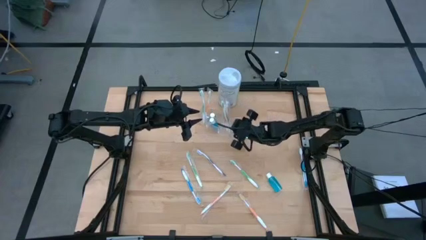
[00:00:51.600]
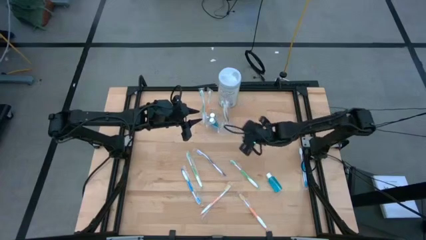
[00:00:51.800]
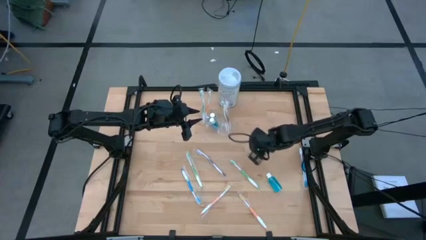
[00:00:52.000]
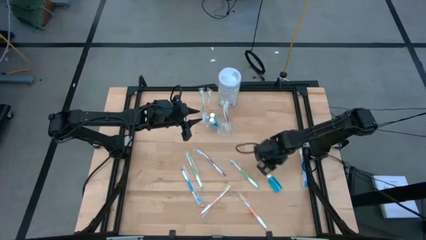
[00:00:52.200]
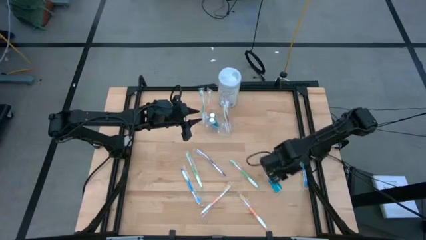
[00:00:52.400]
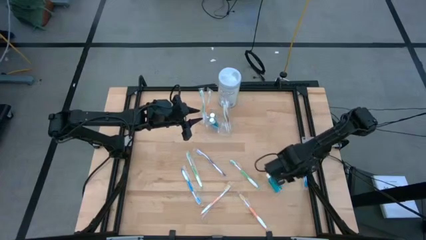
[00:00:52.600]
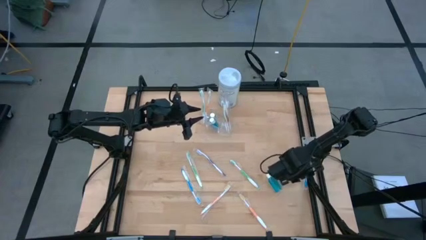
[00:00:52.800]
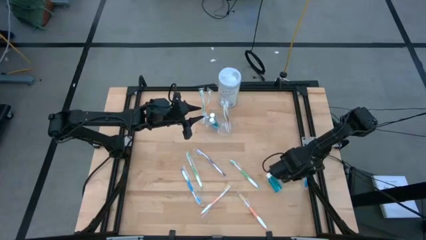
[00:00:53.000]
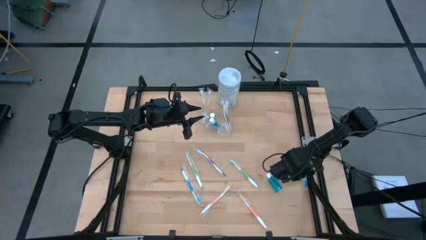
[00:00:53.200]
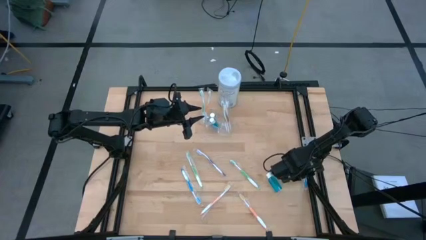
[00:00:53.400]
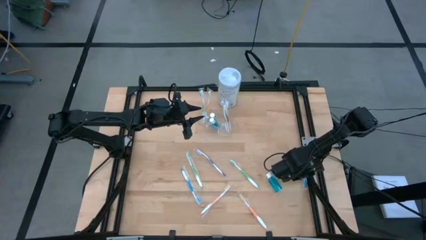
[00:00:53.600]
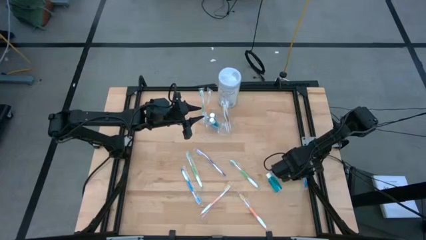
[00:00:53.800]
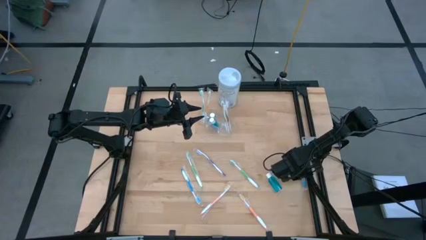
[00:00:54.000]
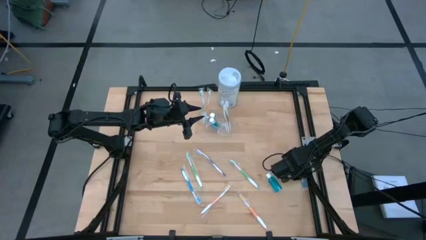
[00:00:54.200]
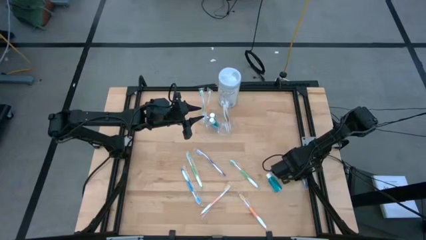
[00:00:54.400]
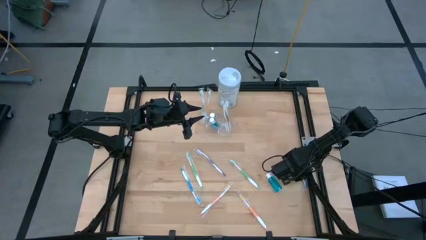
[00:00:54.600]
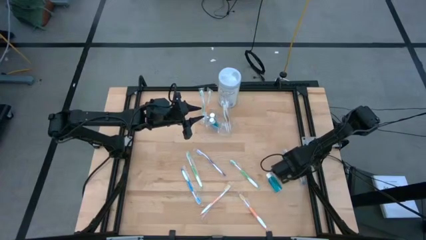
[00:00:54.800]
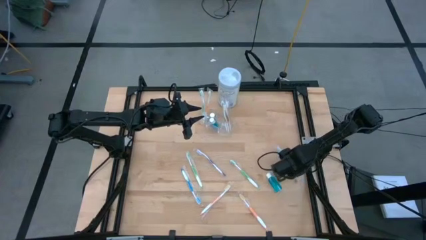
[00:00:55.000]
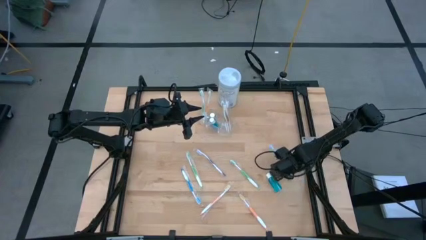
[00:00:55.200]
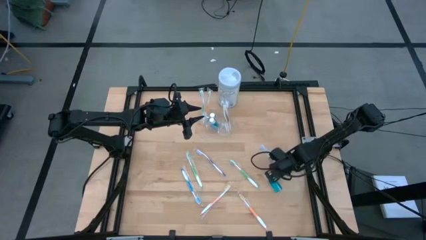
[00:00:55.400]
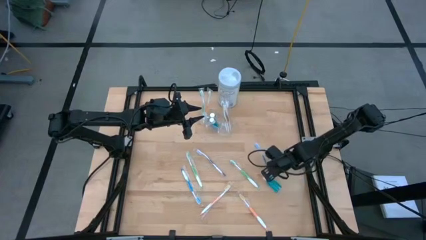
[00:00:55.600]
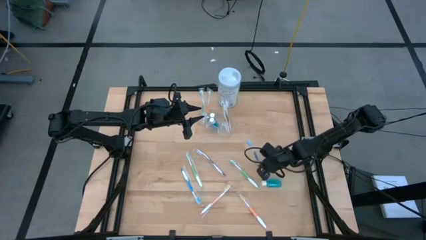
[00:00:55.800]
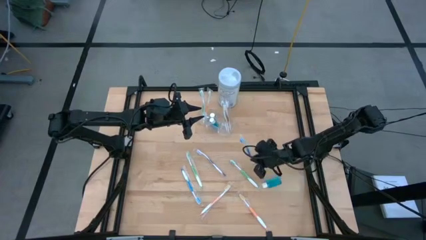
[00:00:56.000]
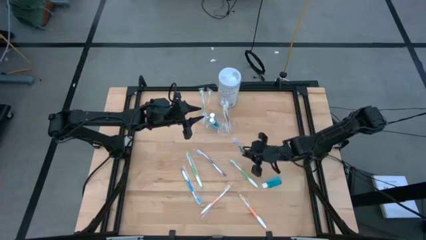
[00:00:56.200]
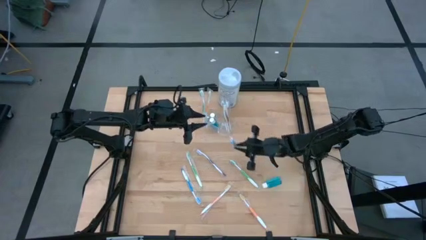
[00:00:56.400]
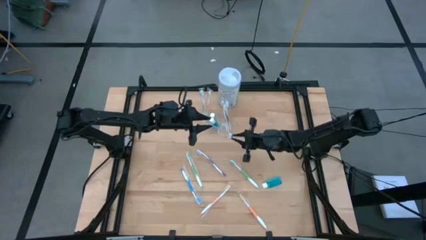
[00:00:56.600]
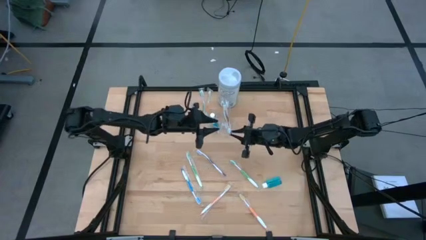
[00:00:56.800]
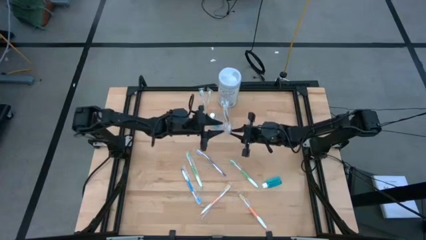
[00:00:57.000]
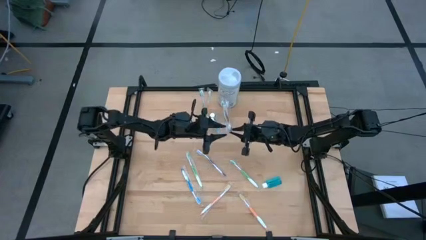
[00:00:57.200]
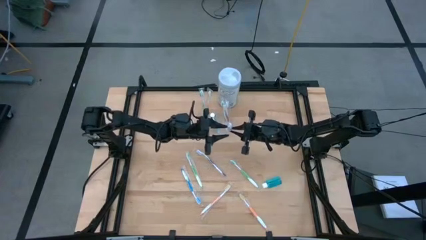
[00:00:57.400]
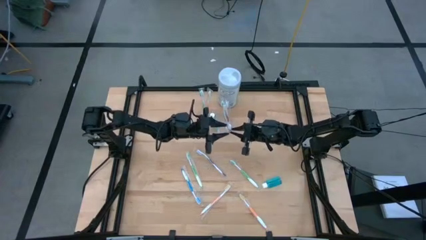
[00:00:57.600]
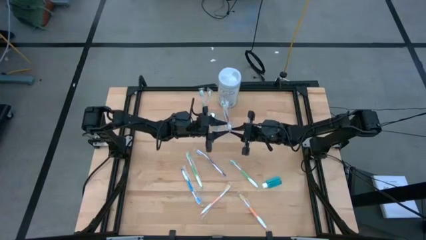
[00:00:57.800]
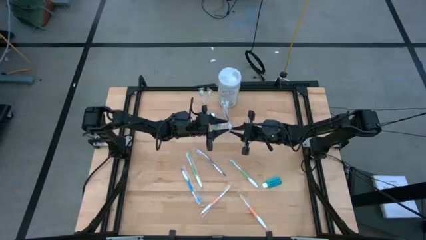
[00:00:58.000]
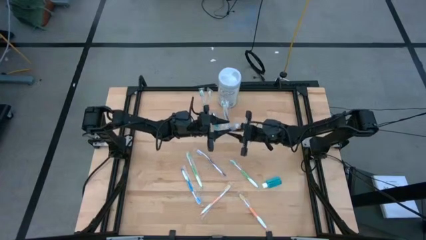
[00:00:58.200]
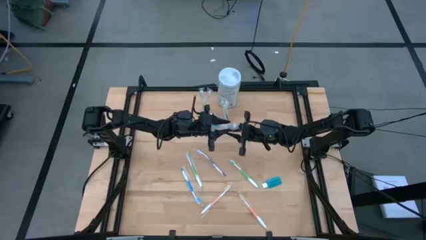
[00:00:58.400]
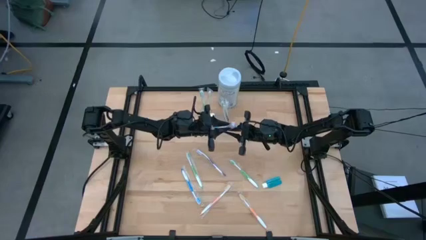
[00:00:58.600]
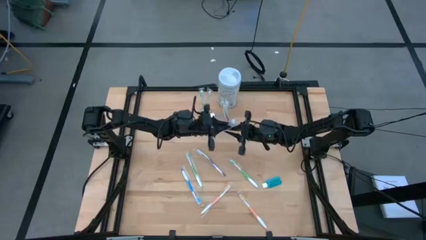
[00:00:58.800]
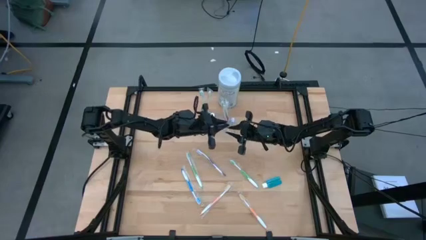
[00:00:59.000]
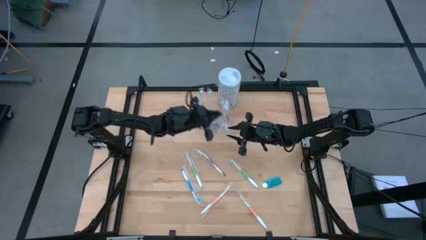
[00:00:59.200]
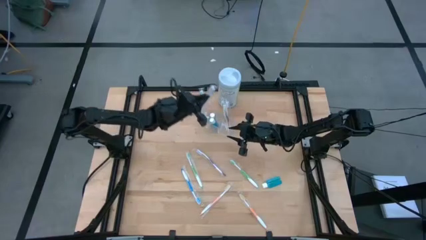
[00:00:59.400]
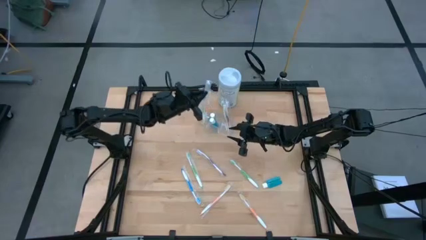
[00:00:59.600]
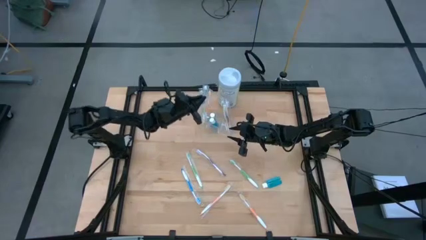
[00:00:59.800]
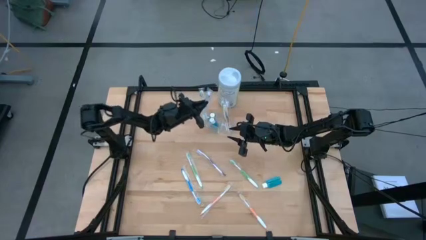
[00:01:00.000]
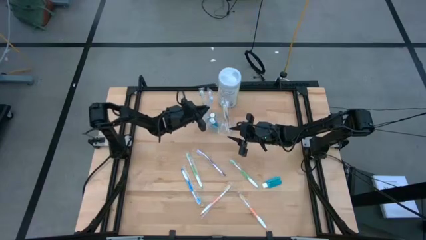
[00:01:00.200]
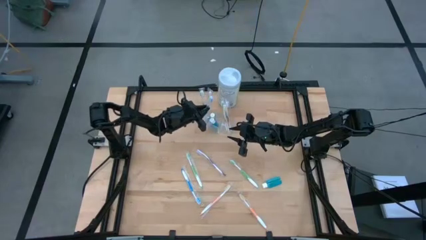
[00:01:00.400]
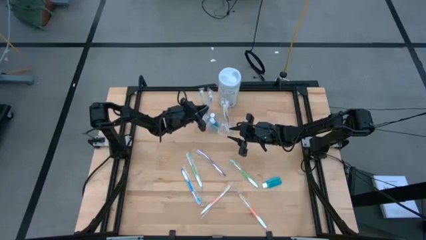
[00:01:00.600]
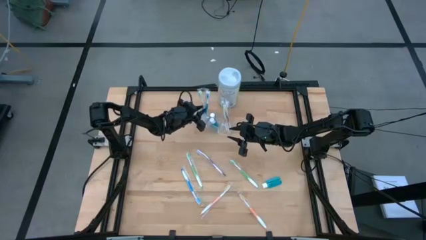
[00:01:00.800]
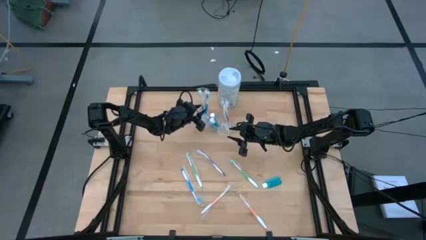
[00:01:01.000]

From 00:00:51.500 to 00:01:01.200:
Task: Pick & Place toothbrushing station
Put the blue toothbrush into the transparent organizer

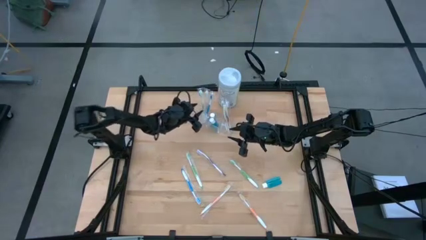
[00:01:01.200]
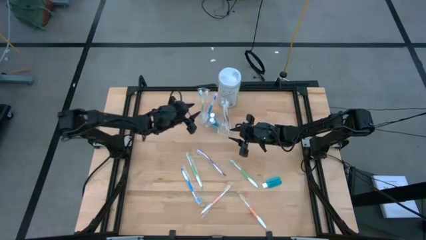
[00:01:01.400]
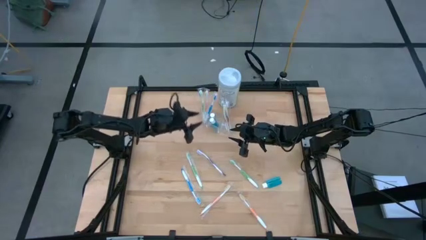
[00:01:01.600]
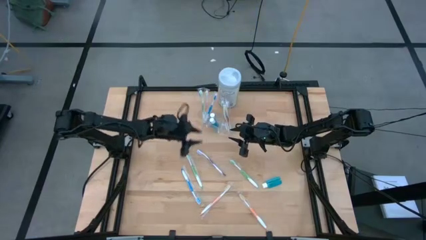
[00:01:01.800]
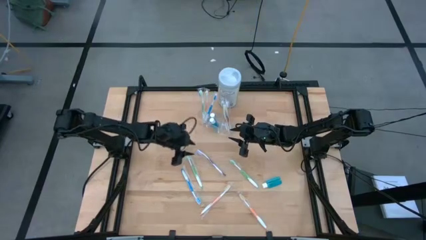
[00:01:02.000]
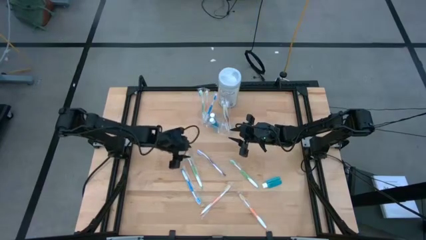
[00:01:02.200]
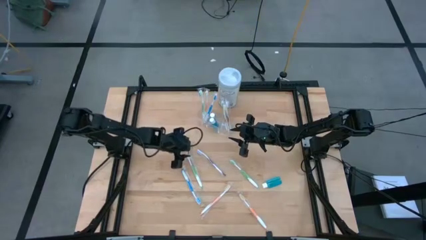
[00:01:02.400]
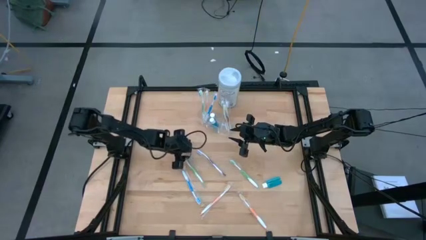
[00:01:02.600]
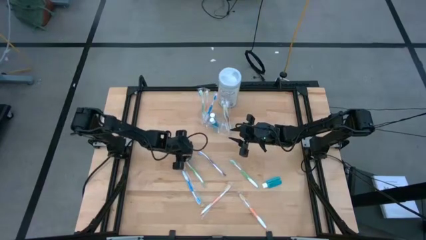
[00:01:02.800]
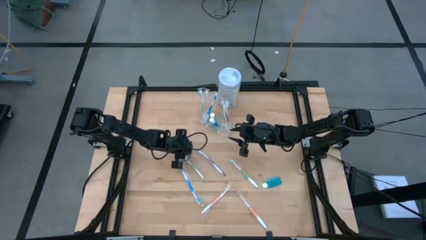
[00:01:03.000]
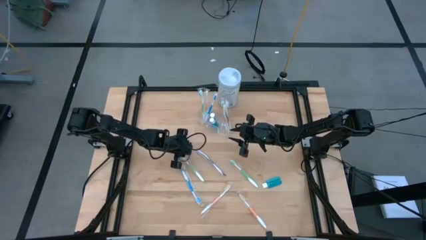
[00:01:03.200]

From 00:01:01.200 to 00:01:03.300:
Put the green toothbrush into the transparent organizer

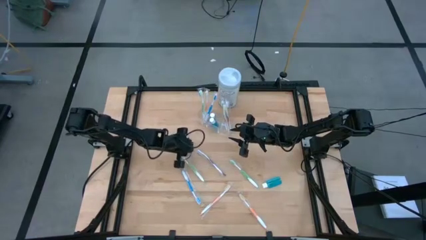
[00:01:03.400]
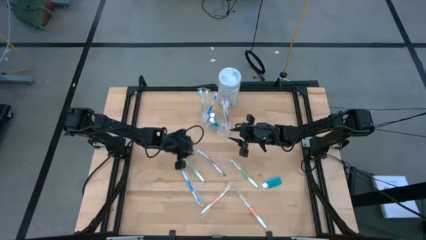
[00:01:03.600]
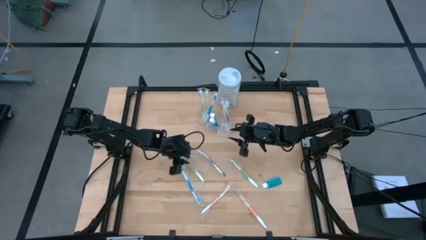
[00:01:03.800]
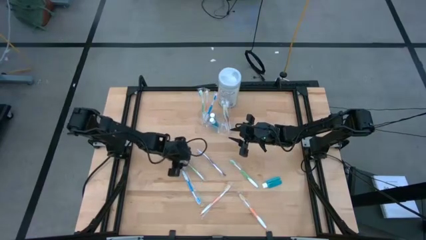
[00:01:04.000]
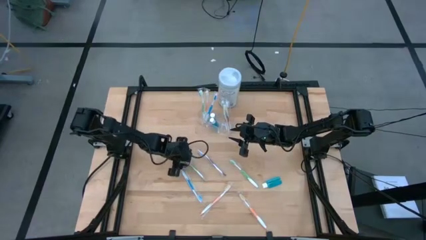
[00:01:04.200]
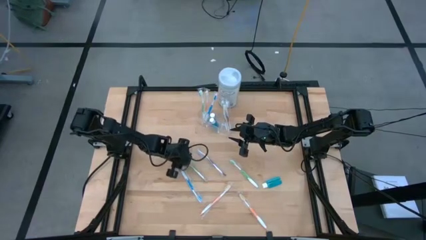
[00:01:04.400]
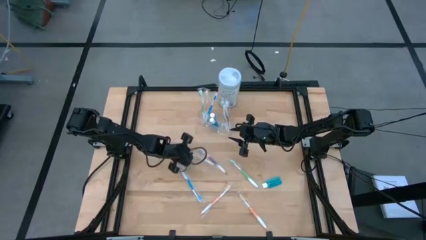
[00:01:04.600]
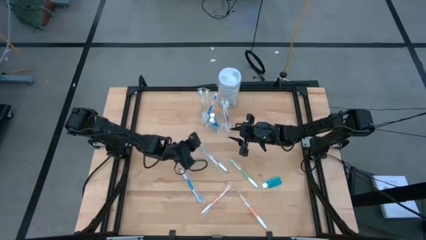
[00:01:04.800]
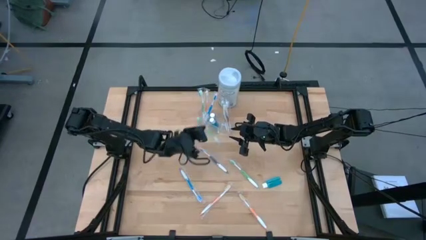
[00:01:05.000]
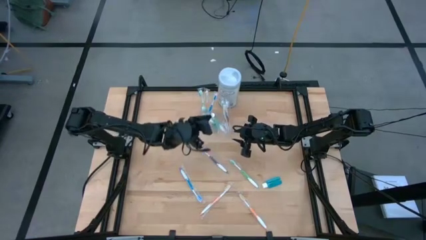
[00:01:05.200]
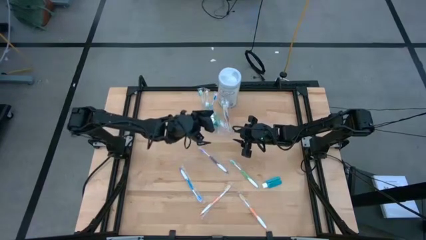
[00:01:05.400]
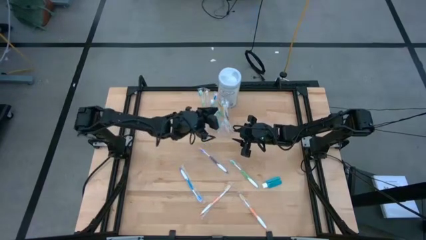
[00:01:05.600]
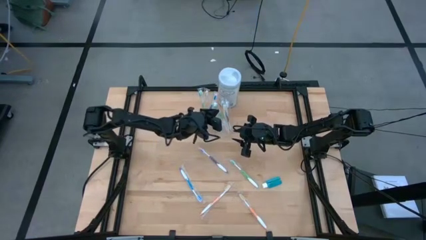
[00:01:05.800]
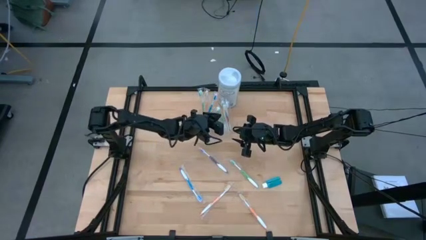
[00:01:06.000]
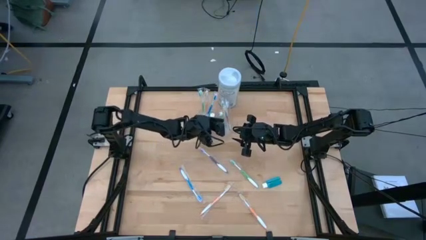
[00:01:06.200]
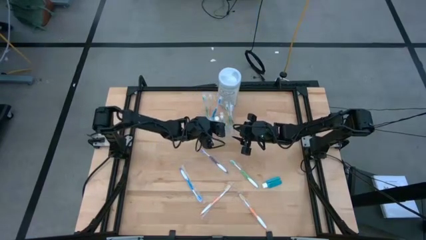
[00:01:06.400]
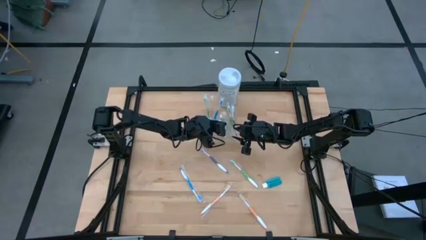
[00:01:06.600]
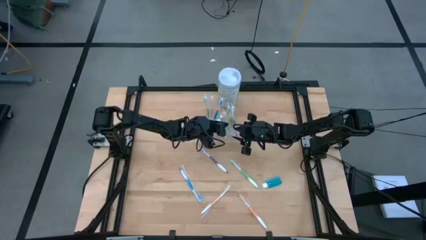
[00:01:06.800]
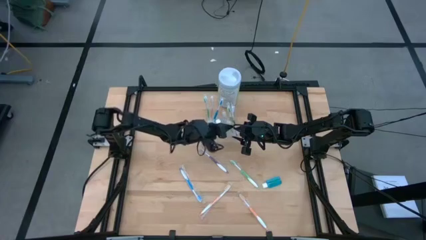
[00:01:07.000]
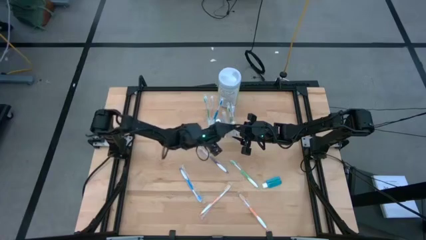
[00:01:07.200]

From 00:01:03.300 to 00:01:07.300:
Put the green toothbrush into the transparent organizer
